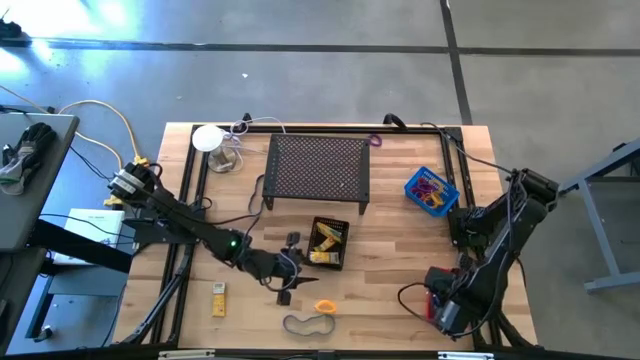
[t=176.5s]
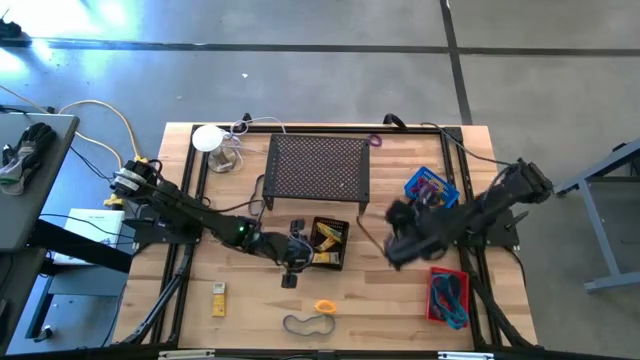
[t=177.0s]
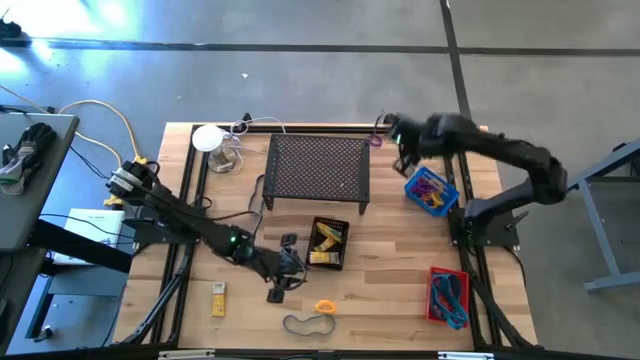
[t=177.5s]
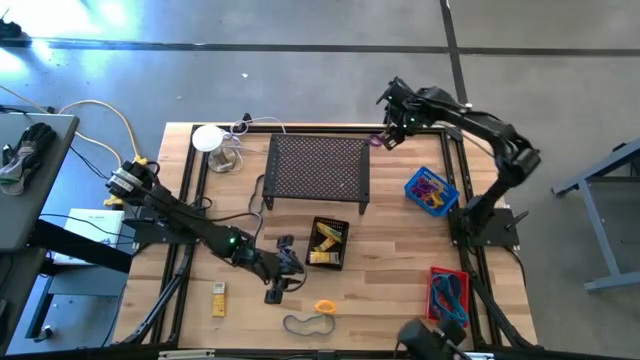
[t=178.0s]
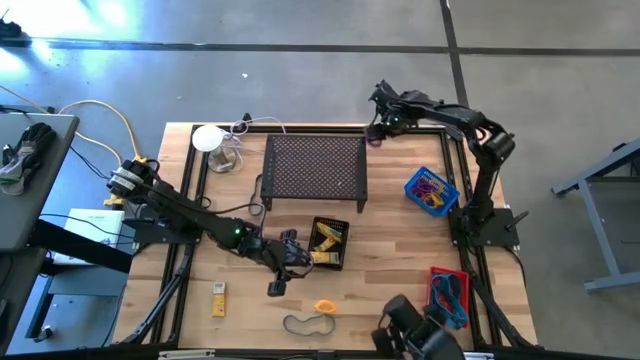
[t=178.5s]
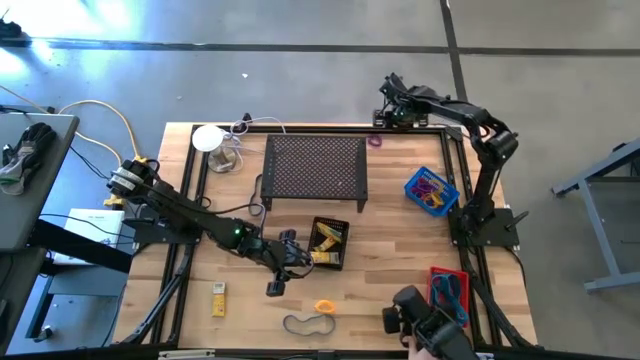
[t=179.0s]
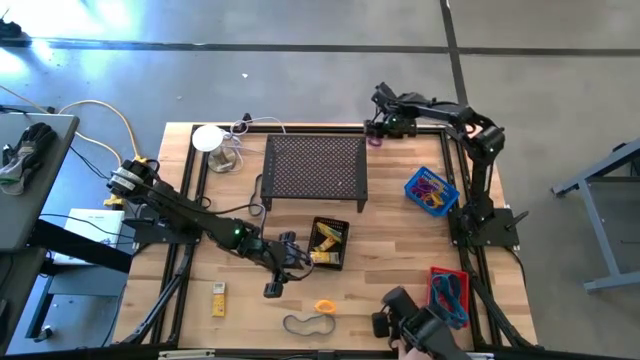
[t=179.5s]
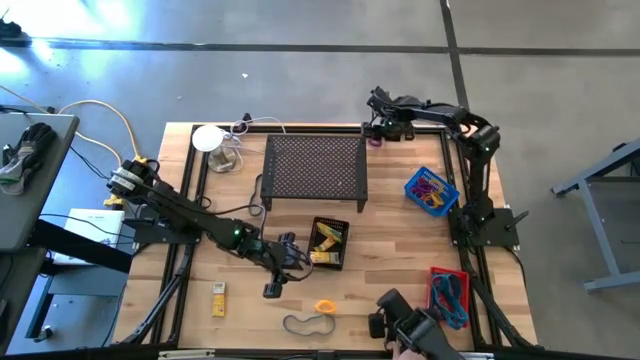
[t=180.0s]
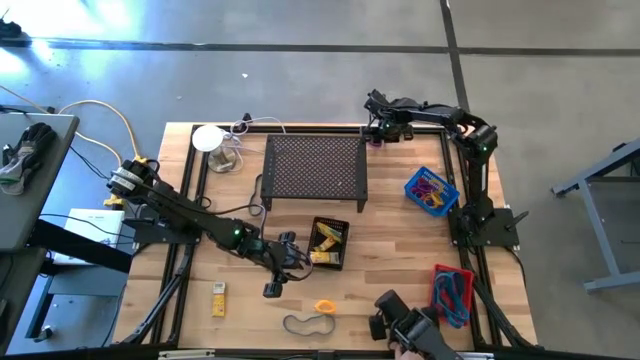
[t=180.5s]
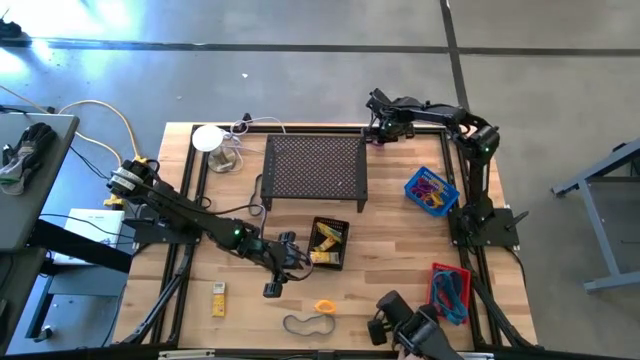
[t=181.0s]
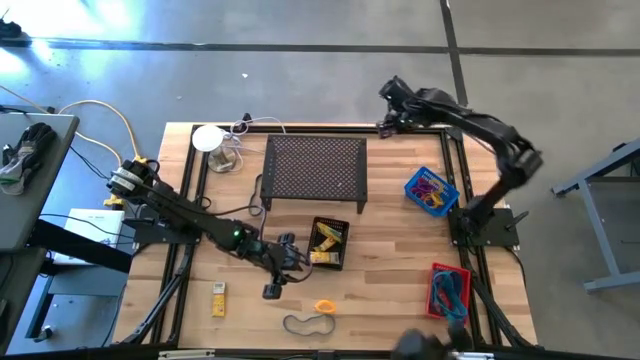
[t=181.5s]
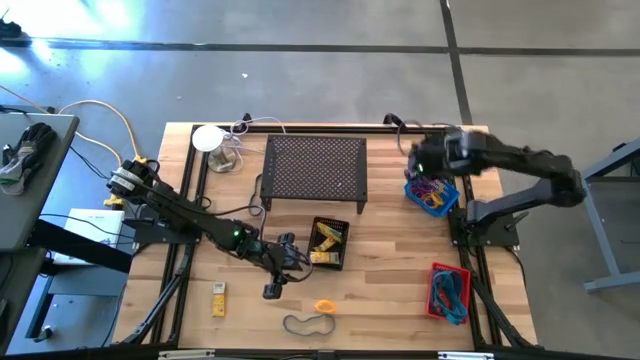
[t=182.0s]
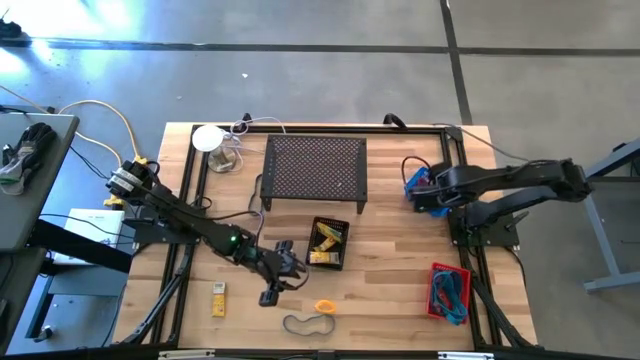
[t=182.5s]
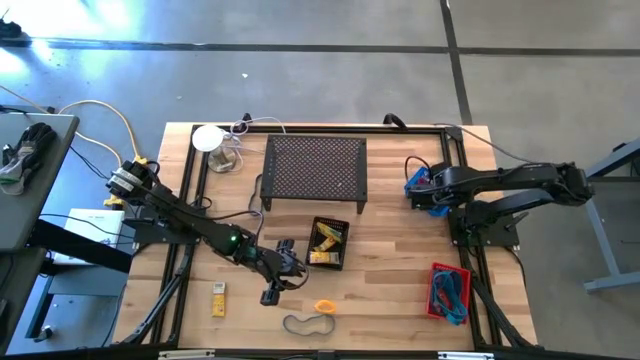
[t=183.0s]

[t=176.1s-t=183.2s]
Task: Pick & Place Office Desk Supplies
Put the purple spring keychain into the blue bin

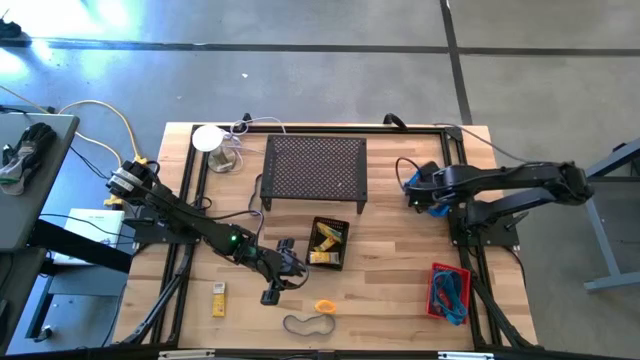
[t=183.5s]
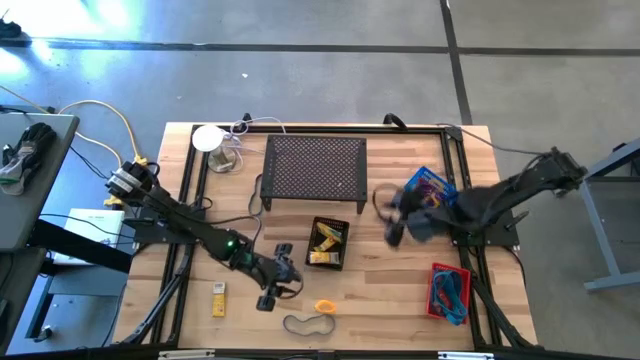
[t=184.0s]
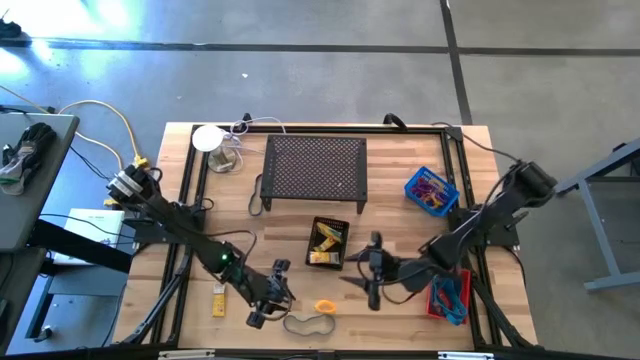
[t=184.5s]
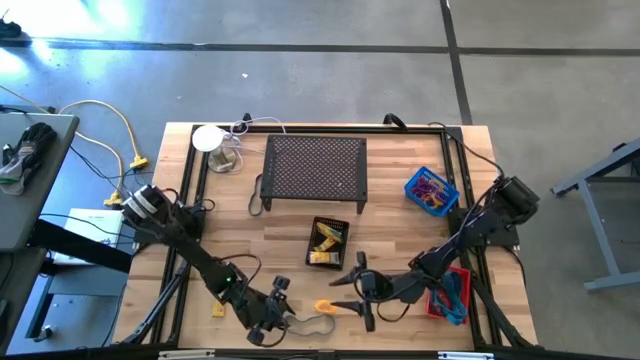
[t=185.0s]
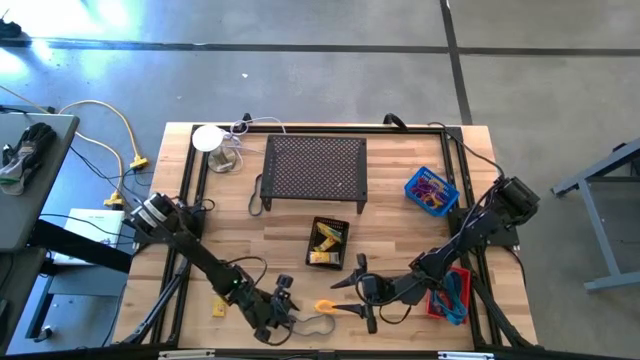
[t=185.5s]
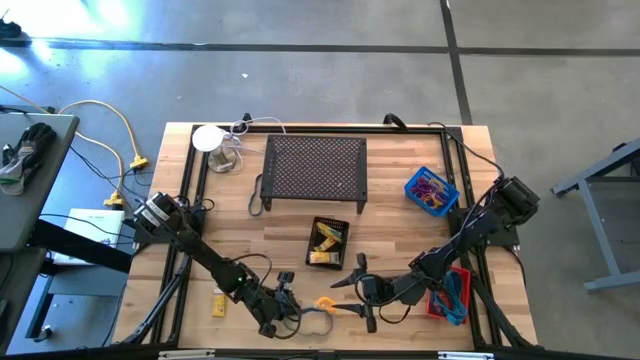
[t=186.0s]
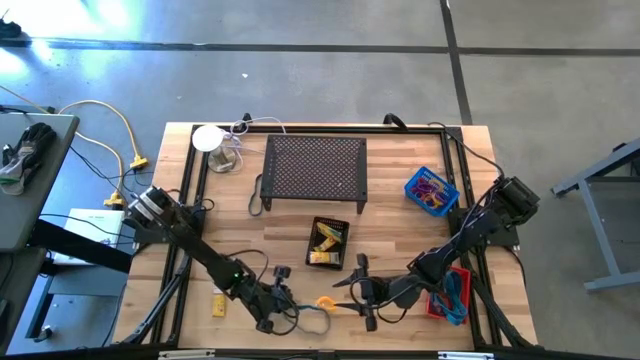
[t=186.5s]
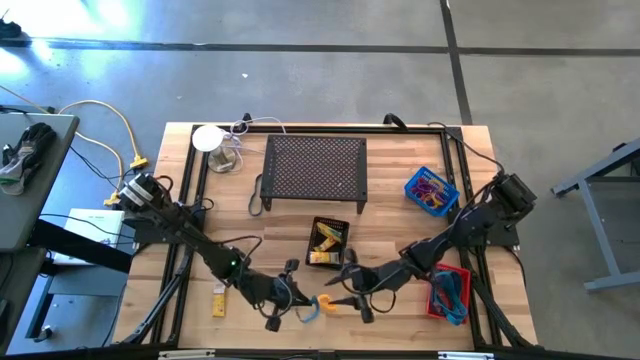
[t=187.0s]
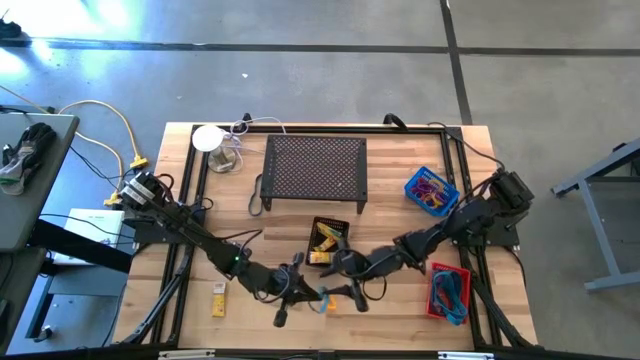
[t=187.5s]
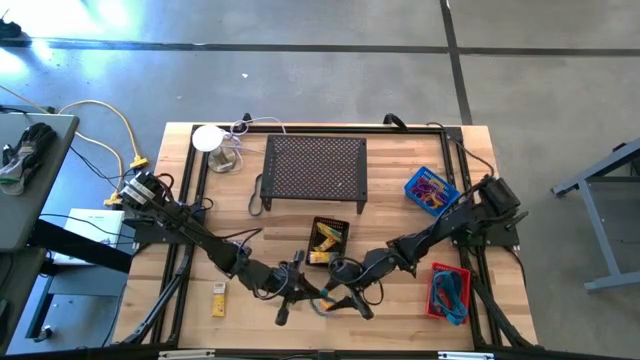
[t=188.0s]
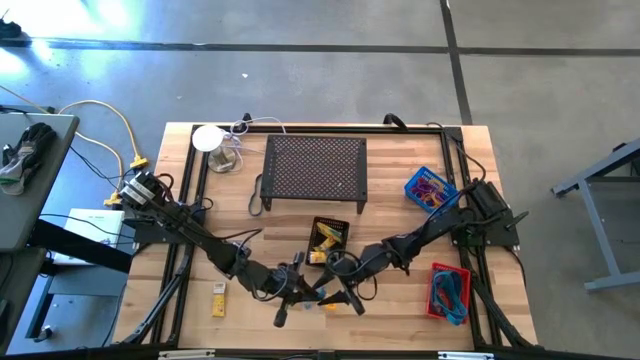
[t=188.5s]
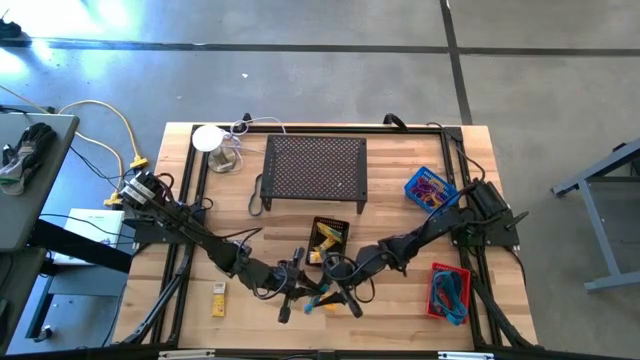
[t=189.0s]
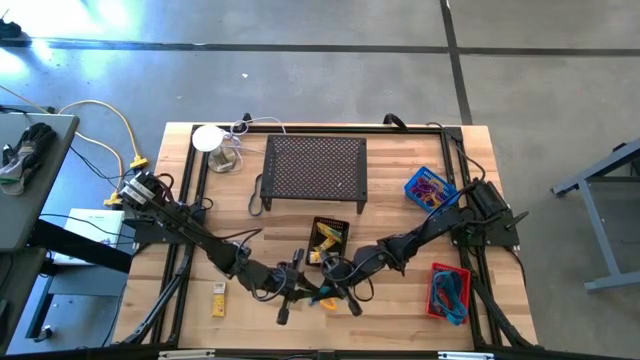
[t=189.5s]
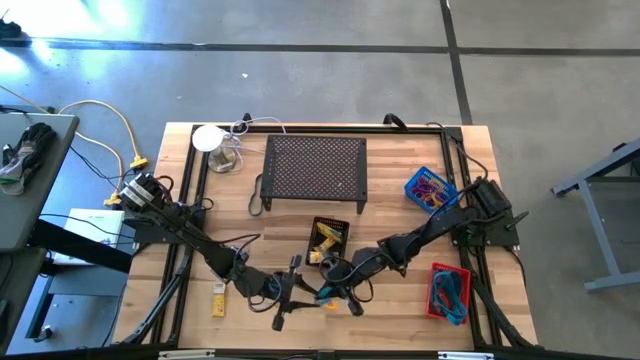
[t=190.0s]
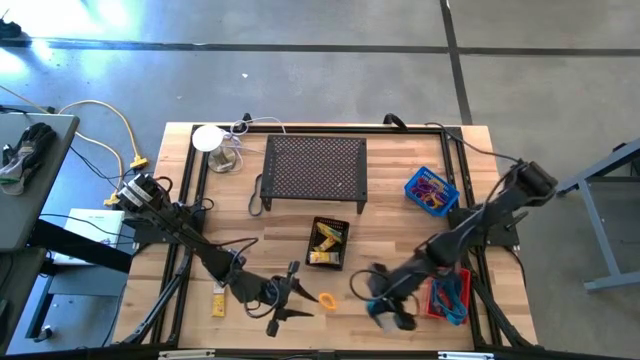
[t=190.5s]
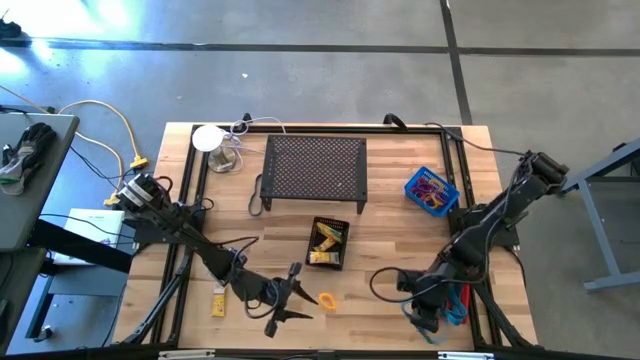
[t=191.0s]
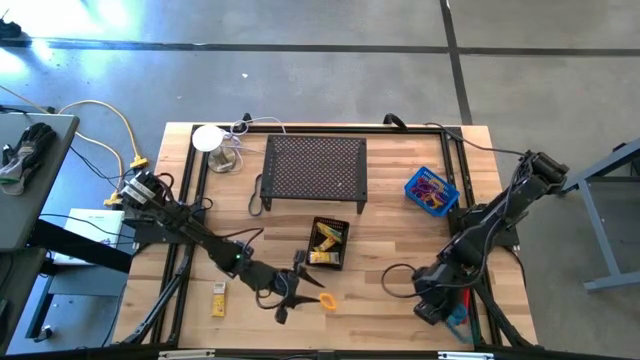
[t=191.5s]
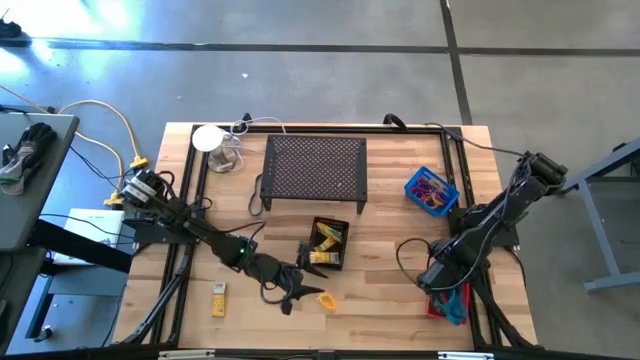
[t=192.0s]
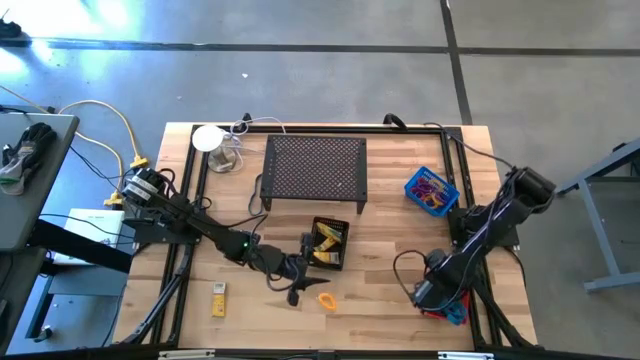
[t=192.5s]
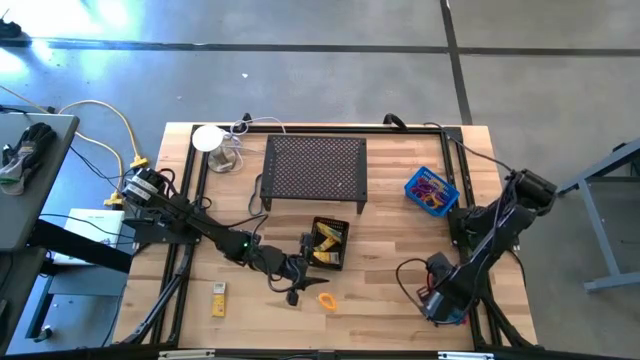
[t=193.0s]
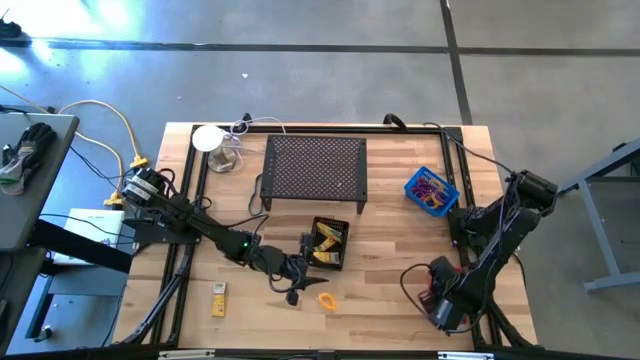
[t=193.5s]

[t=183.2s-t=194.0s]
Put the blue rubber band into the orange bin
